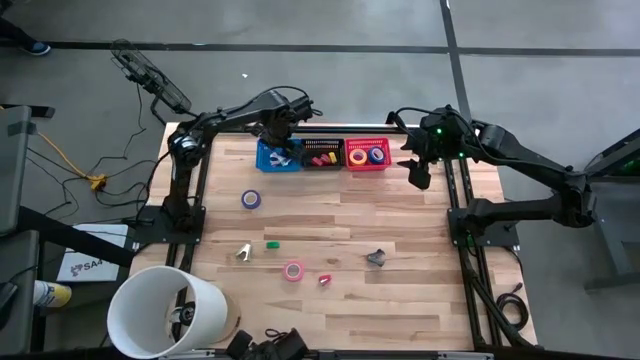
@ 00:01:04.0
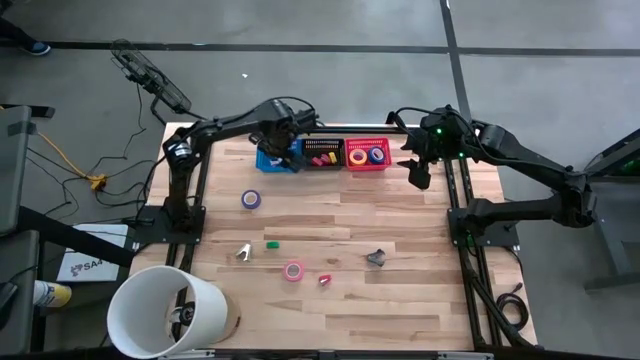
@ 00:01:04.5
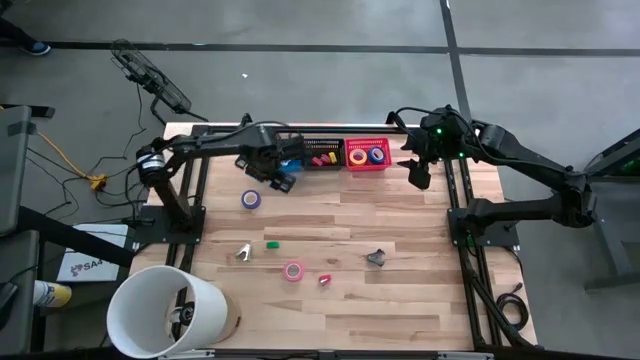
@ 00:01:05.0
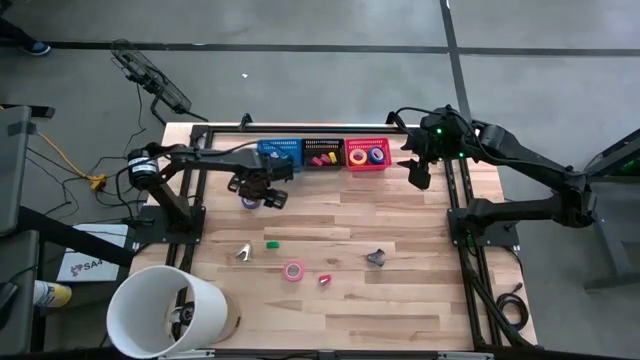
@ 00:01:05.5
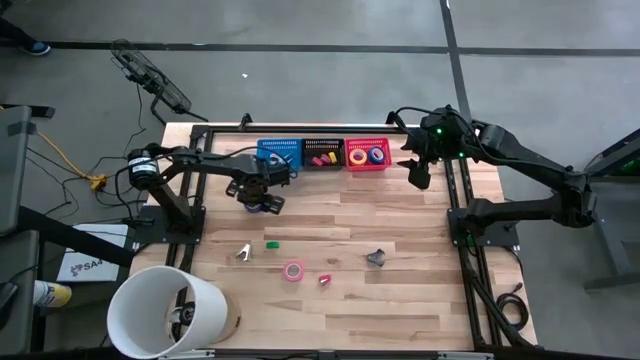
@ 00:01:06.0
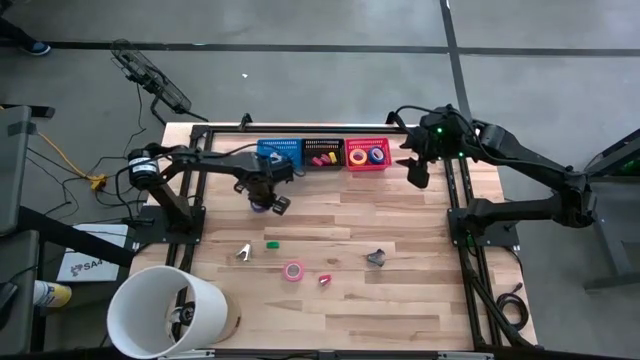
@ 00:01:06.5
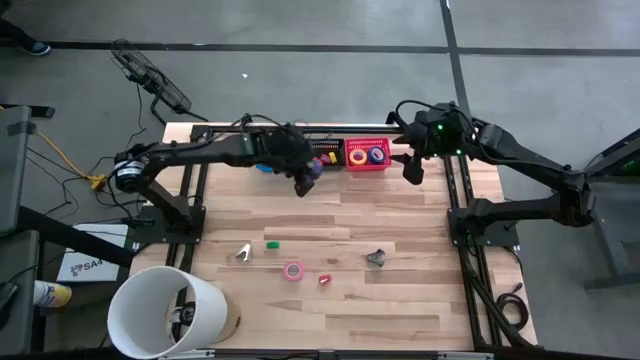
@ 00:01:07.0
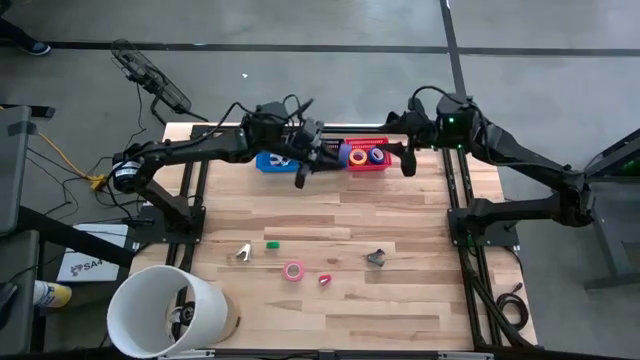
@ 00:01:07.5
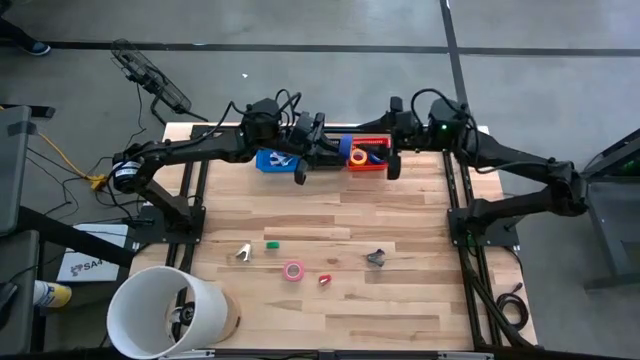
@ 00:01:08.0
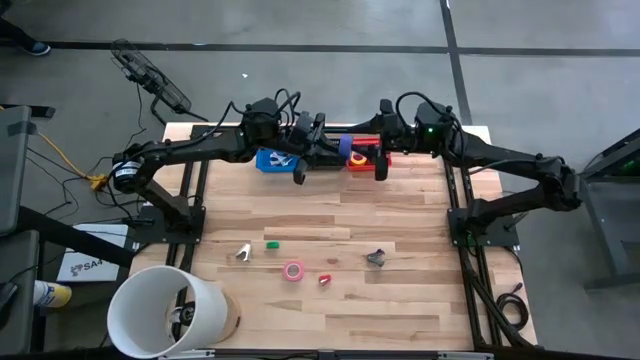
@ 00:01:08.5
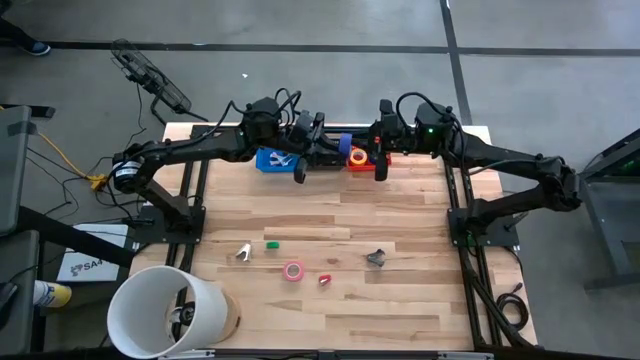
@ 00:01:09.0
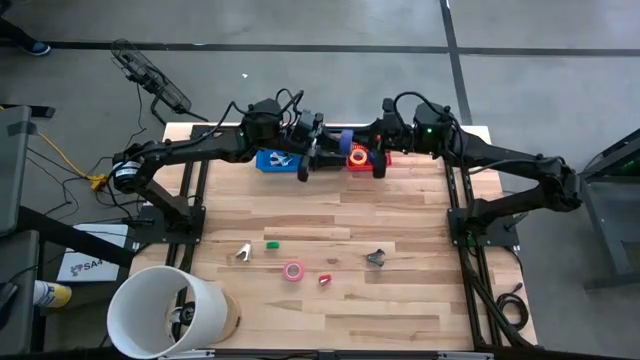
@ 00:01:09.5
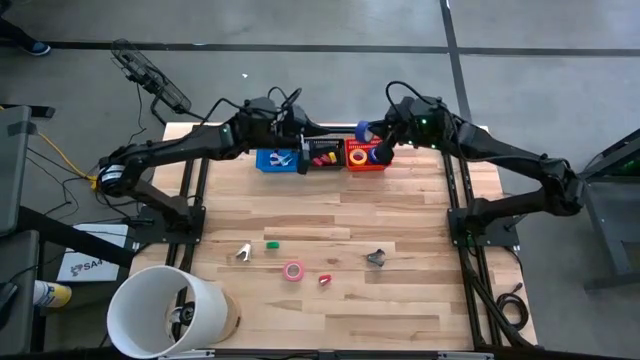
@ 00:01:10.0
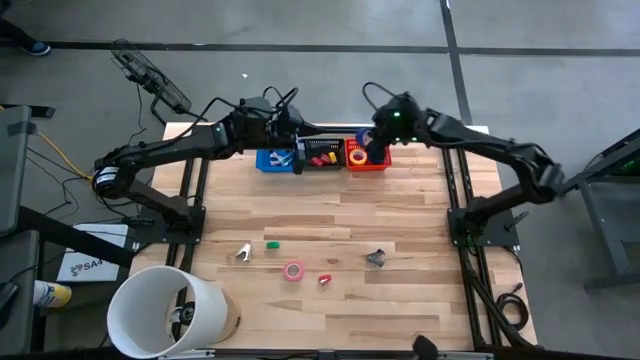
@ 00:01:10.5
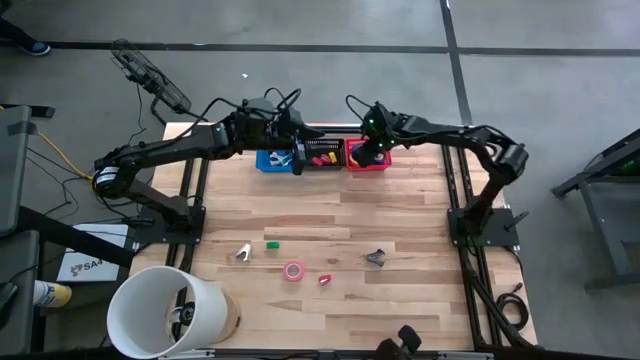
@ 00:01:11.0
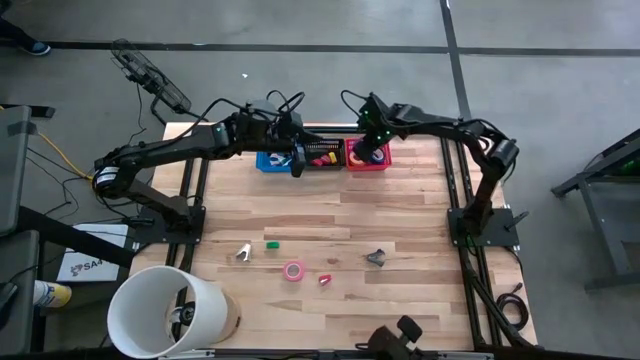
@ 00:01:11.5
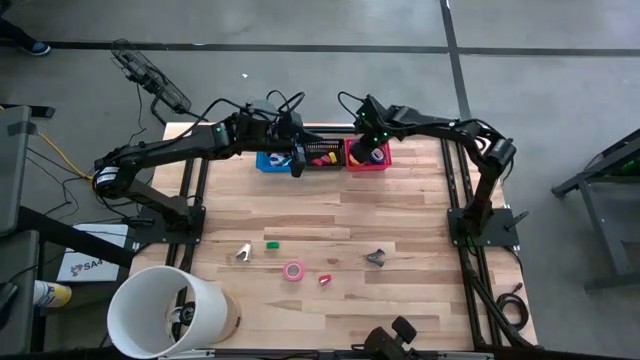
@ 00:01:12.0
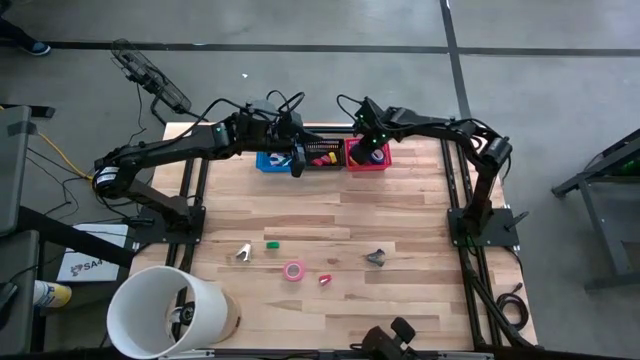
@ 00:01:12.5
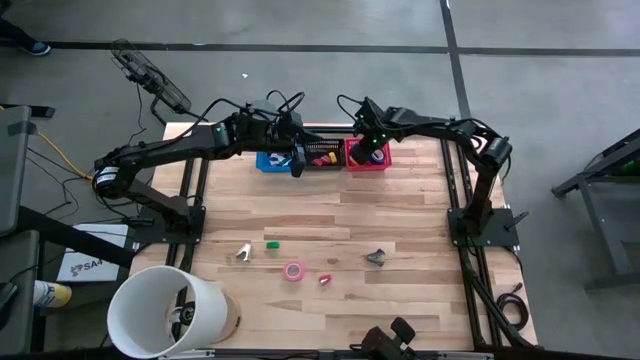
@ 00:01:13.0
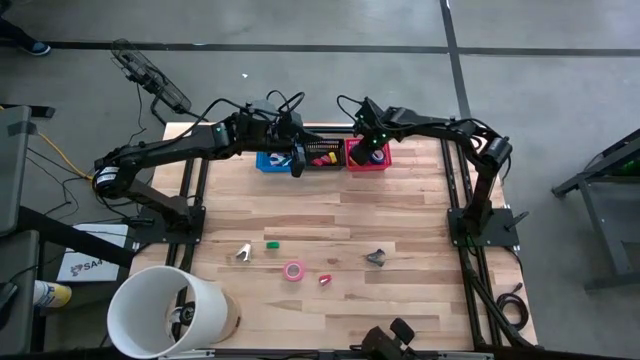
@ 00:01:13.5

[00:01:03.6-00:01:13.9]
Task: Pick and place Stapler, Stapler remover, tape
Stack the blue and purple tape on top of the yellow tape in the red bin

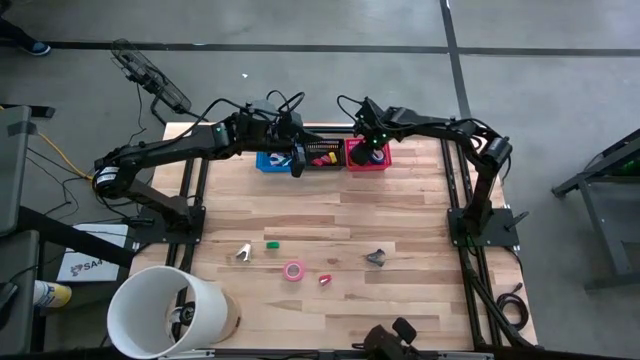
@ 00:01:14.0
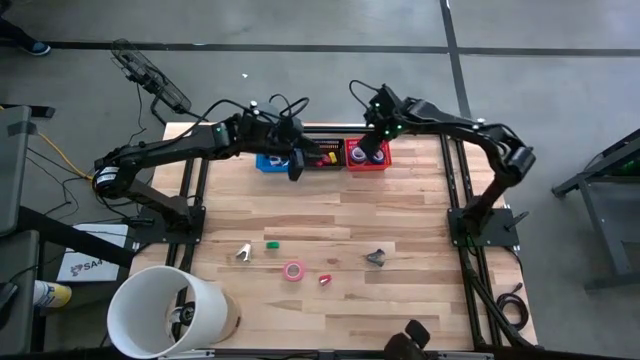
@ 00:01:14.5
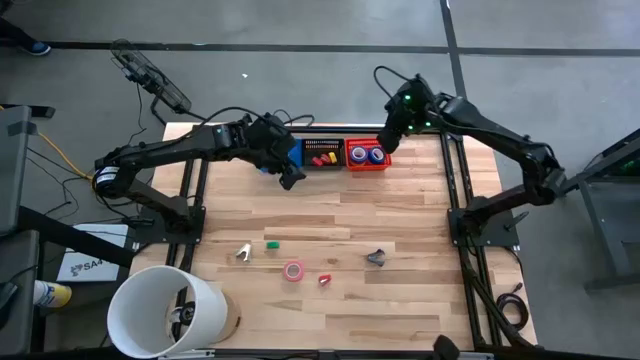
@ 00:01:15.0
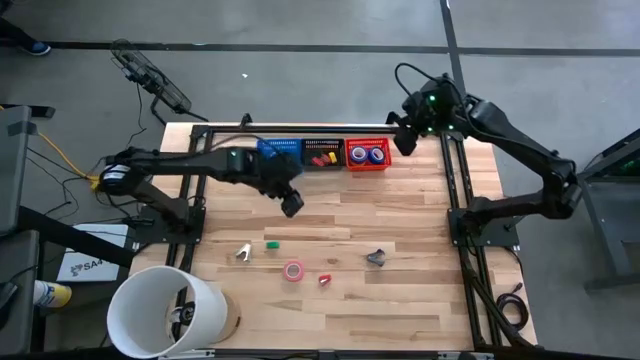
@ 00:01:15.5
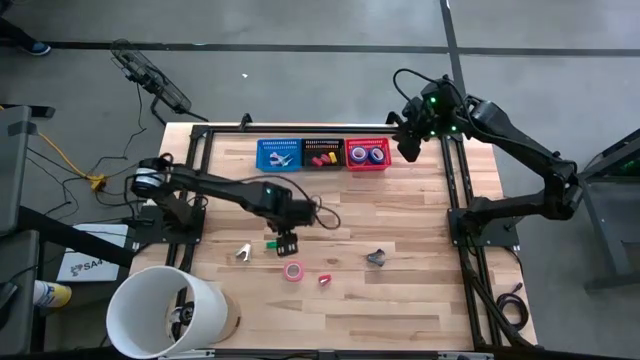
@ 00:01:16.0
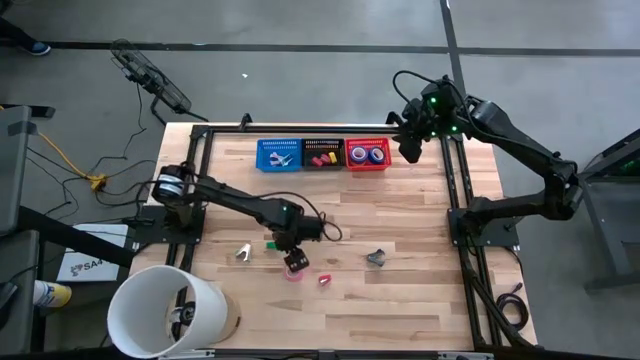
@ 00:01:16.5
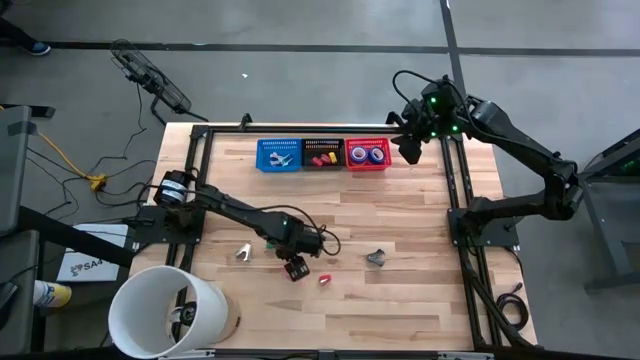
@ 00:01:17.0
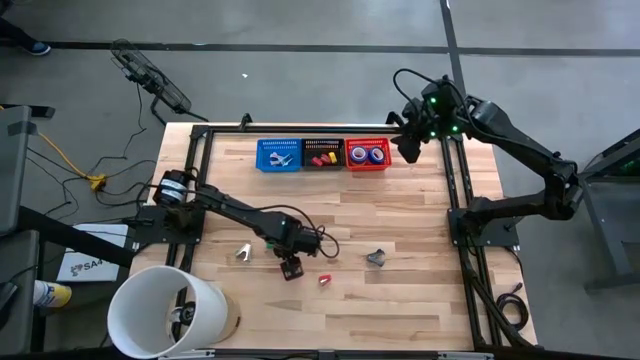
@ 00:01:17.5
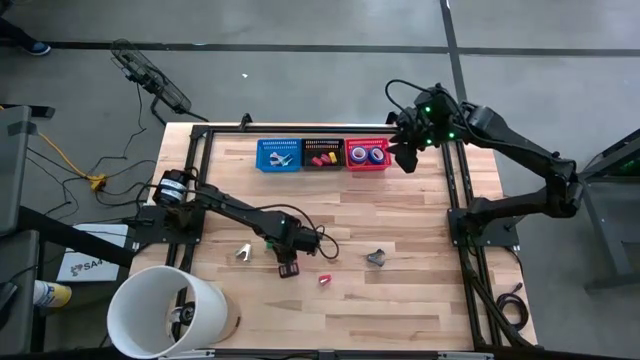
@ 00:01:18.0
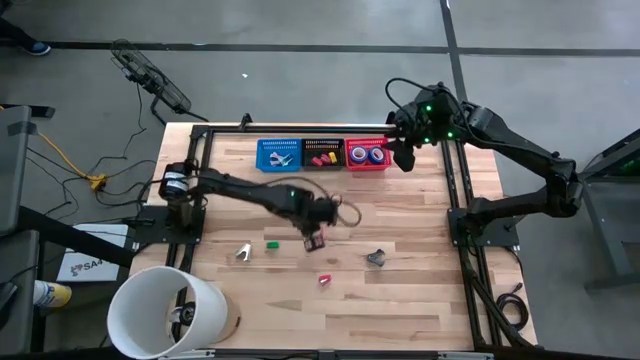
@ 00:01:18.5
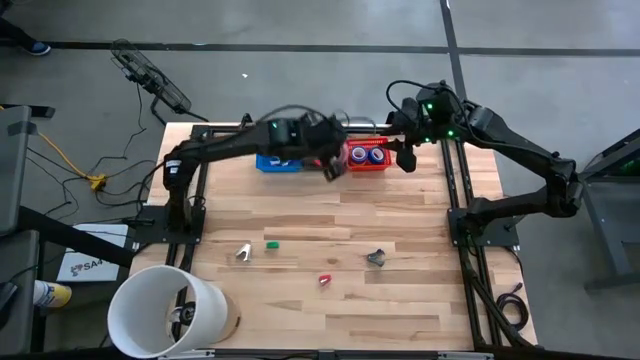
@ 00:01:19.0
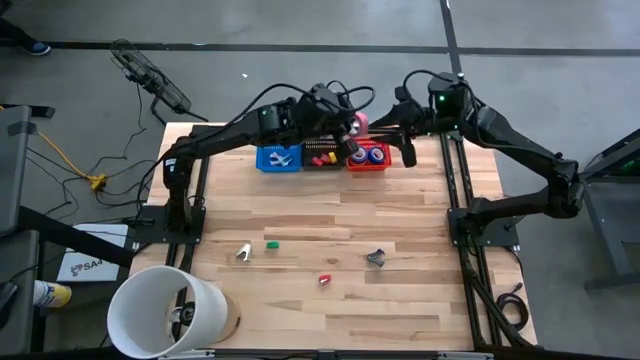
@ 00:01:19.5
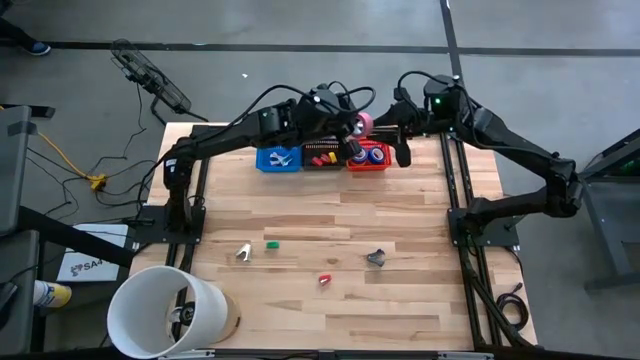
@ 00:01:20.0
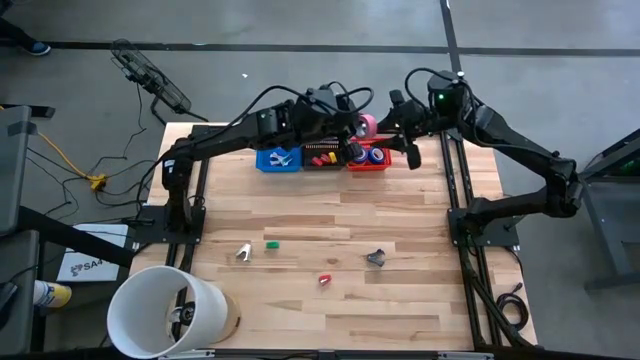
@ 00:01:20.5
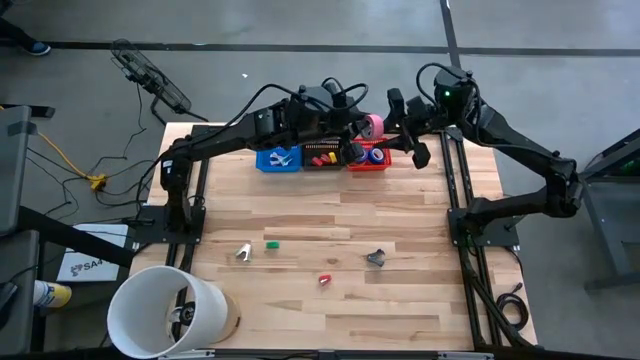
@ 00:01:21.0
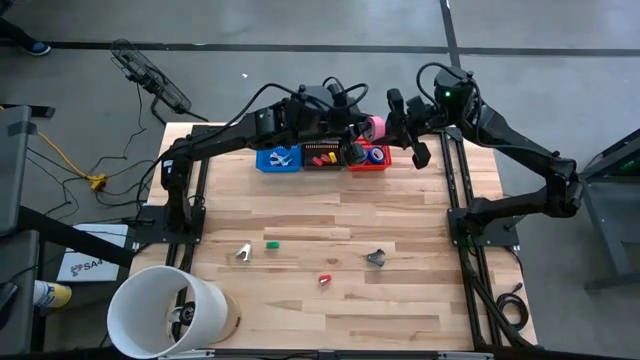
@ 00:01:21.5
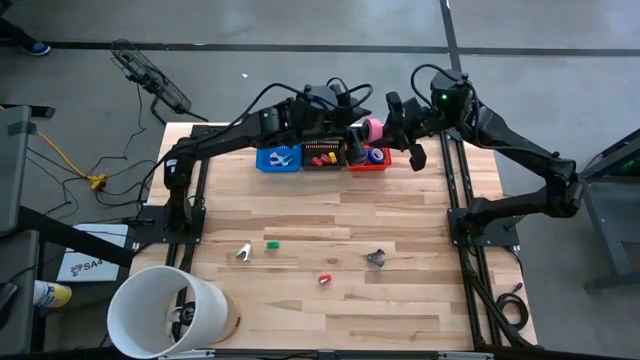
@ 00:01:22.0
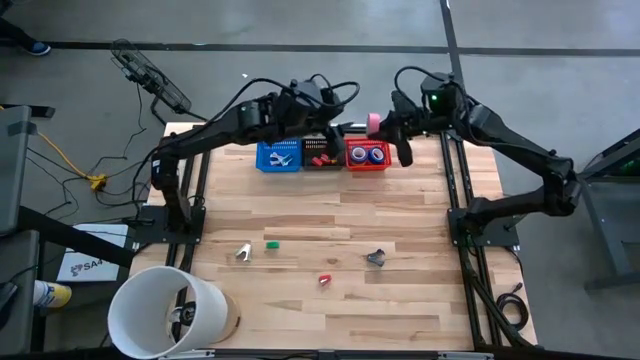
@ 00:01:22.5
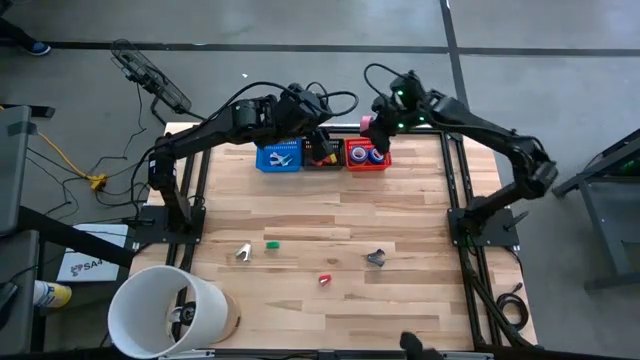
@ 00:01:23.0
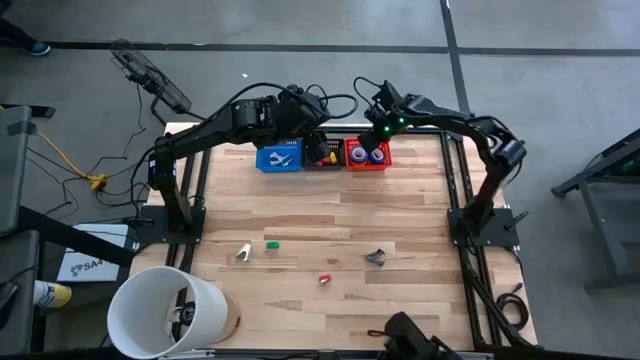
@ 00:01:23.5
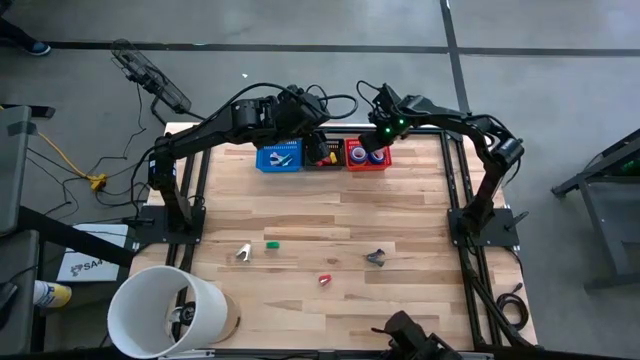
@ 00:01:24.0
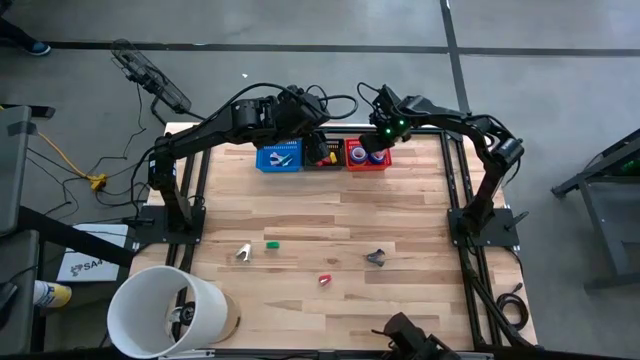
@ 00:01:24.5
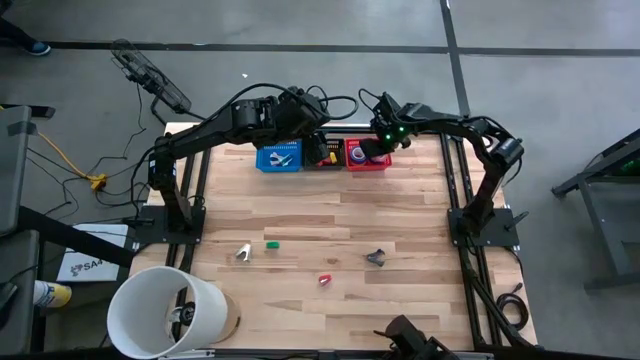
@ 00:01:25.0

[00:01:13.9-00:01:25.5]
Stack the pink tape on top of the blue tape in the red bin
